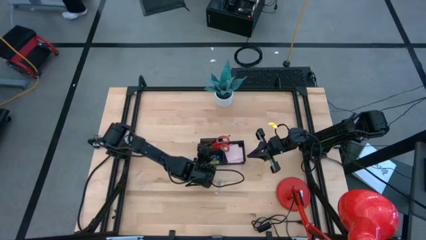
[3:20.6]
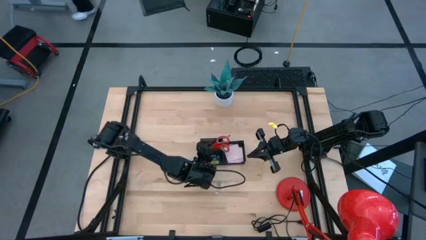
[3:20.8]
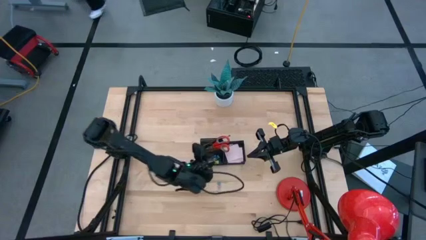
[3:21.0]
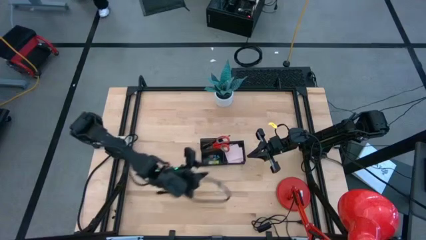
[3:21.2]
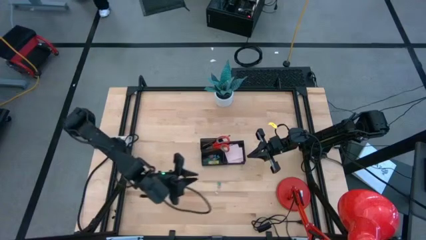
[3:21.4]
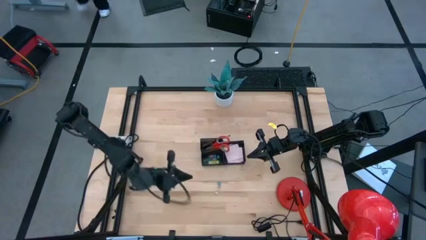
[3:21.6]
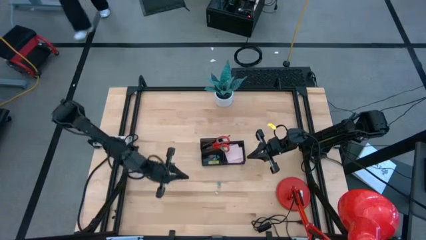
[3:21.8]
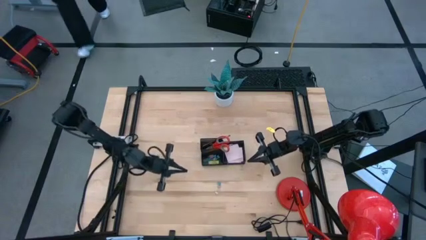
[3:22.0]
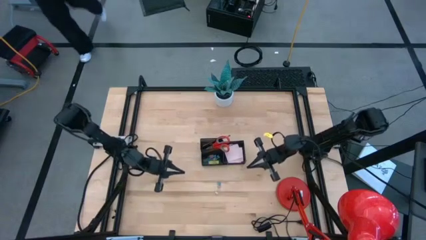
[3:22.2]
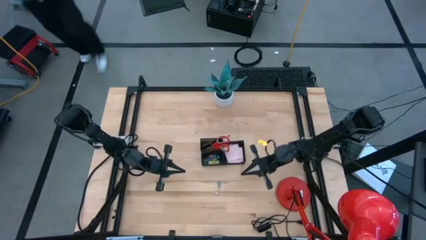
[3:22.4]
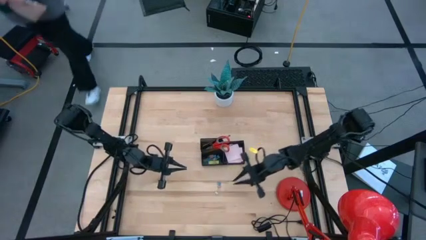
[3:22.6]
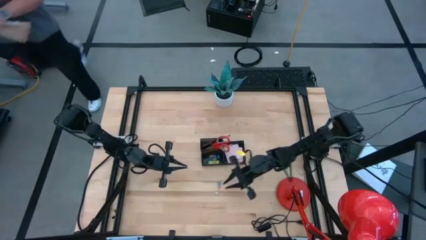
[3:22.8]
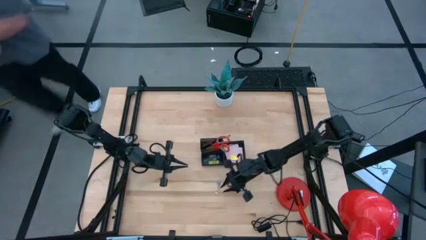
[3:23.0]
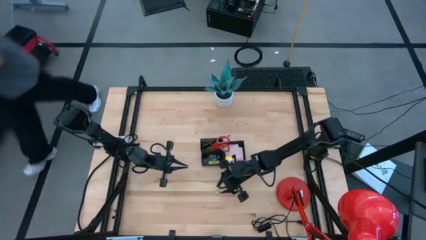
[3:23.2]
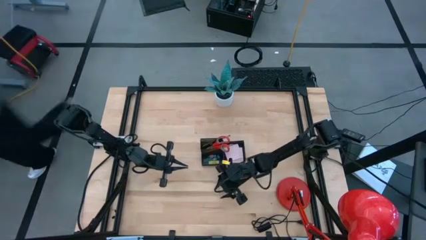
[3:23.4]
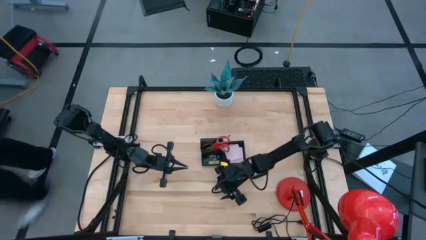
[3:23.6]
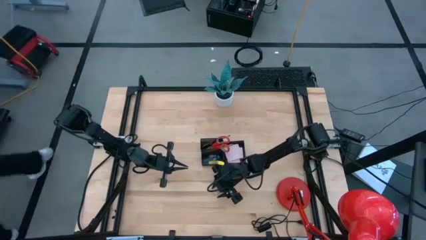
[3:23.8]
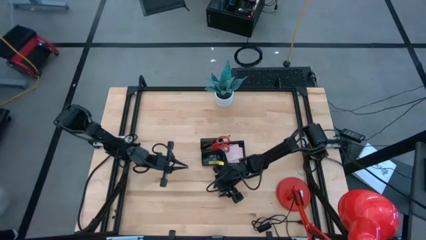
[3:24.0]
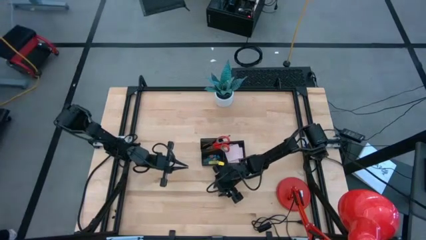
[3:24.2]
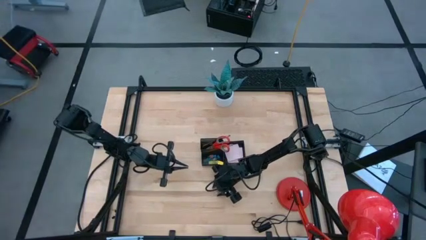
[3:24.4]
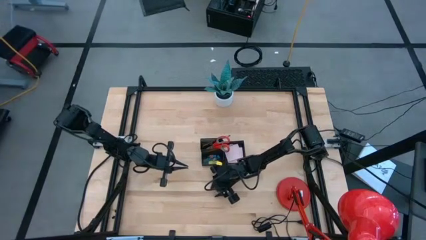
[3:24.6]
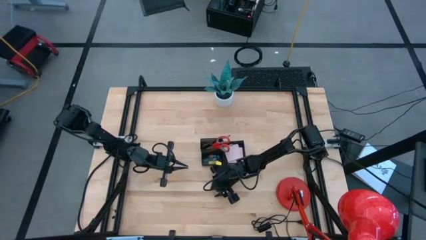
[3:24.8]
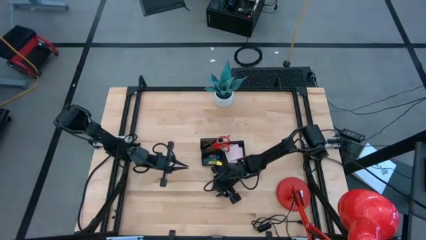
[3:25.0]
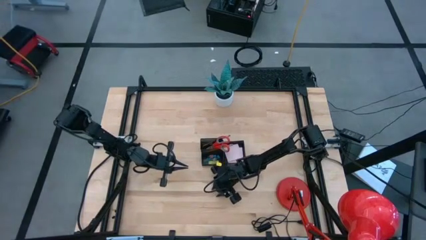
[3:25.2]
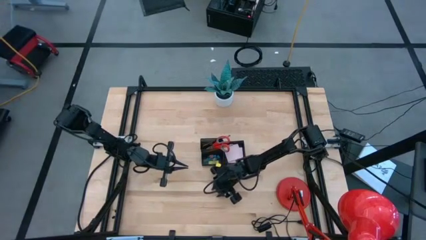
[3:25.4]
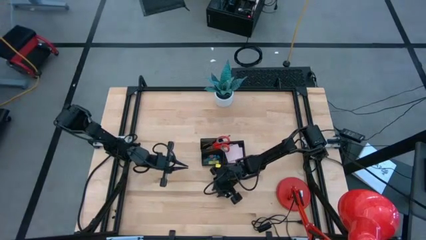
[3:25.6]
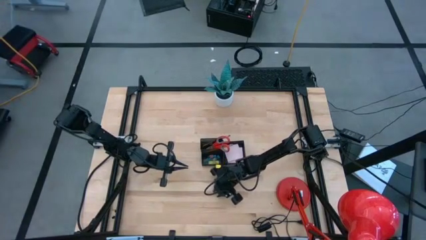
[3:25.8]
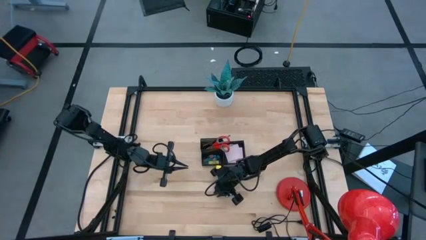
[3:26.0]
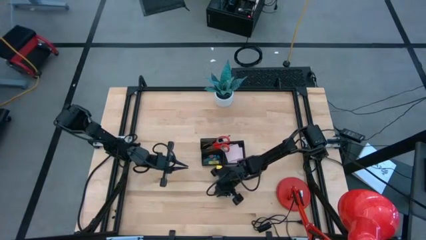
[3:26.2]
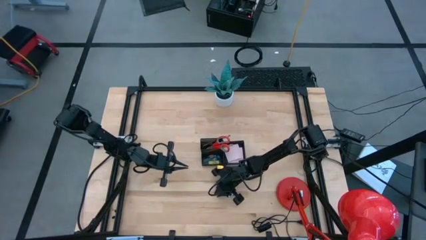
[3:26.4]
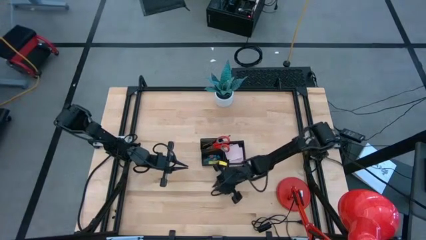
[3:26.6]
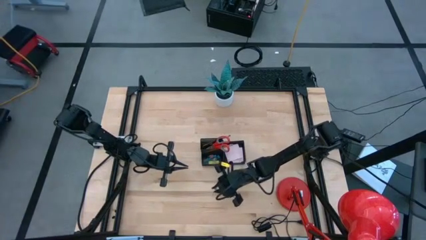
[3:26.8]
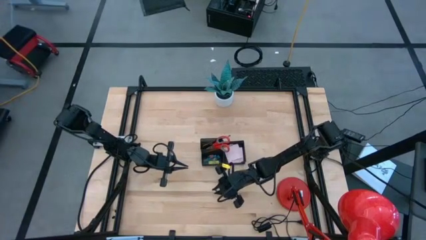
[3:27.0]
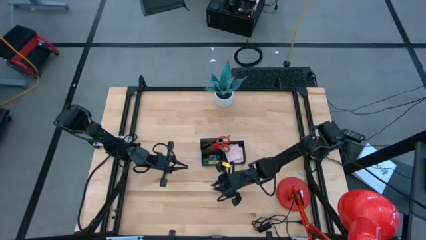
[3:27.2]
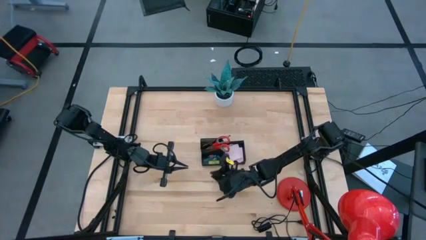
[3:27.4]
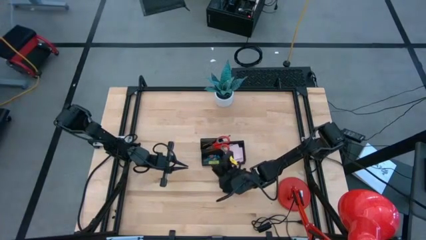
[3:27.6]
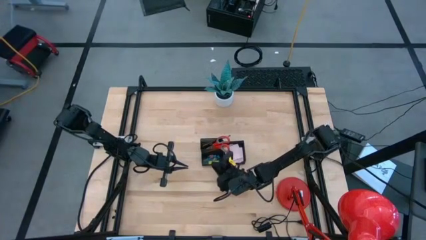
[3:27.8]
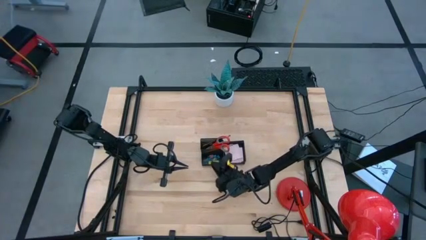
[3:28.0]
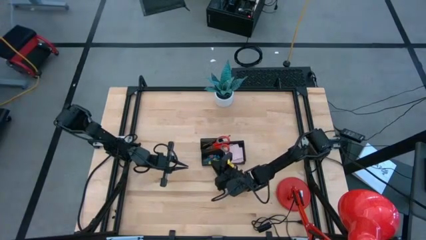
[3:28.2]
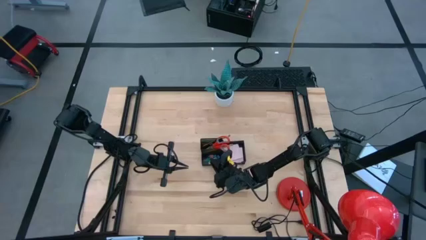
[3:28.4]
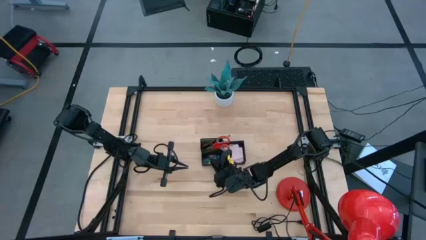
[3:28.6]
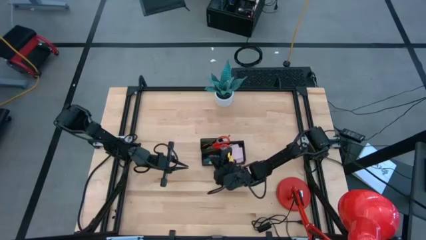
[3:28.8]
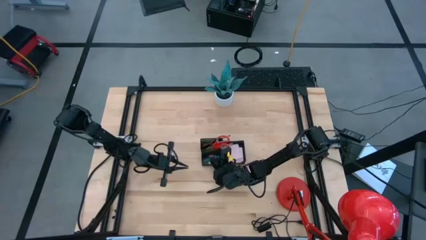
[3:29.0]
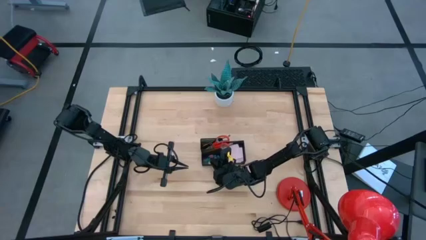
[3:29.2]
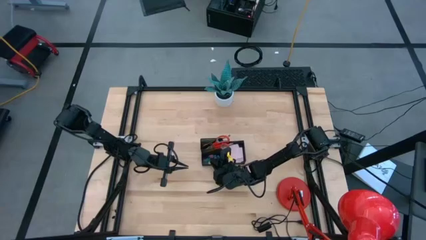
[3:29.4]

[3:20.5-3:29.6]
Task: Pick and place office supplies into organizer
Put the yellow binder clip into the desk organizer

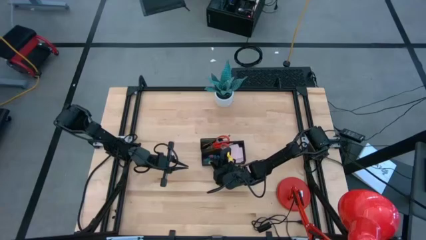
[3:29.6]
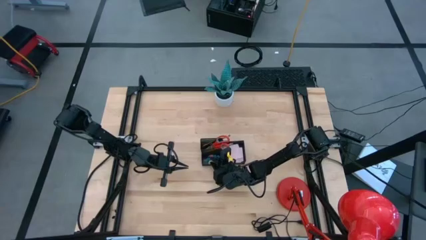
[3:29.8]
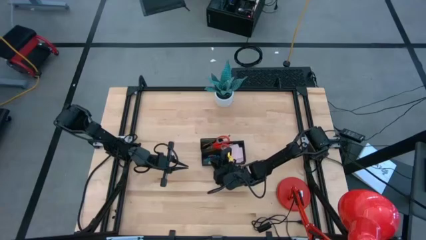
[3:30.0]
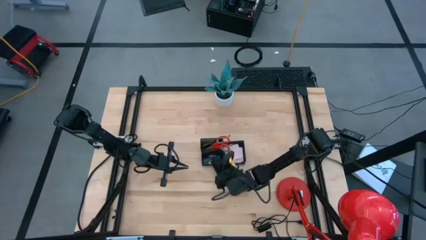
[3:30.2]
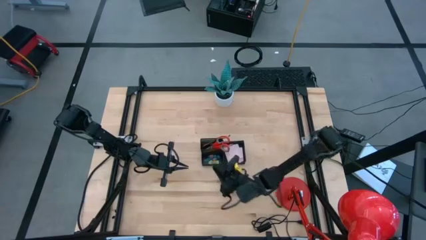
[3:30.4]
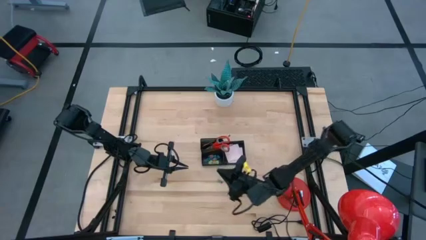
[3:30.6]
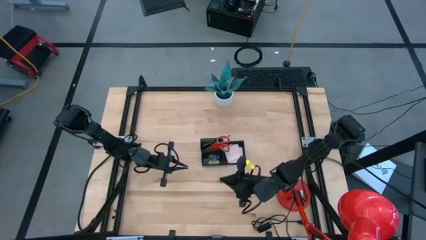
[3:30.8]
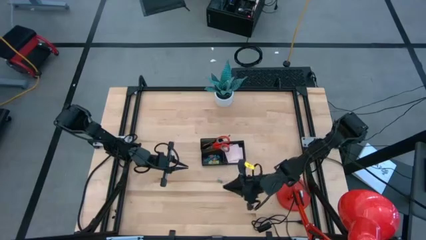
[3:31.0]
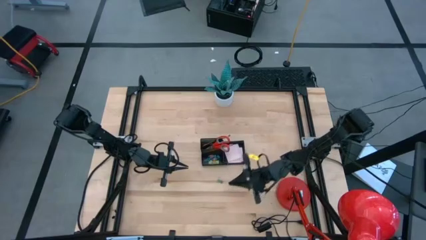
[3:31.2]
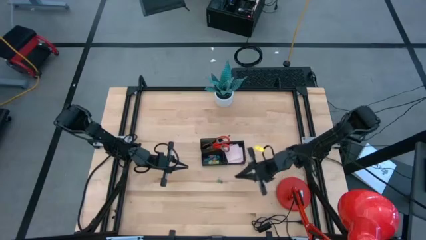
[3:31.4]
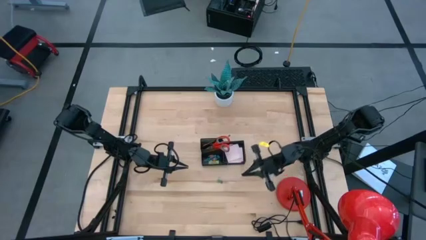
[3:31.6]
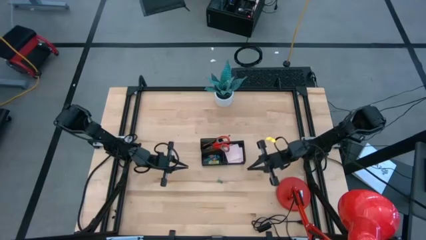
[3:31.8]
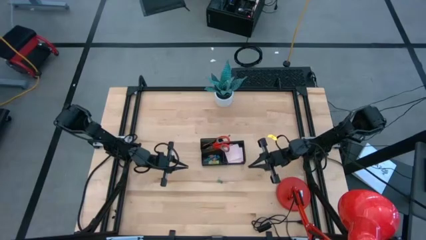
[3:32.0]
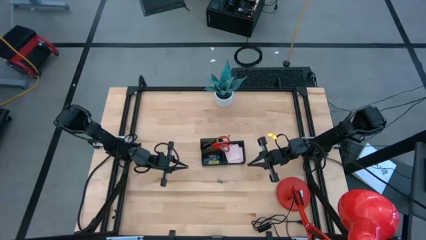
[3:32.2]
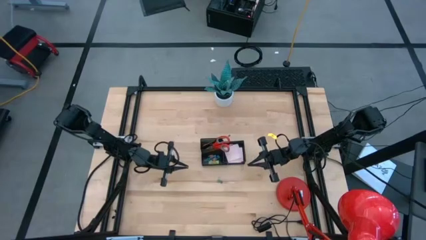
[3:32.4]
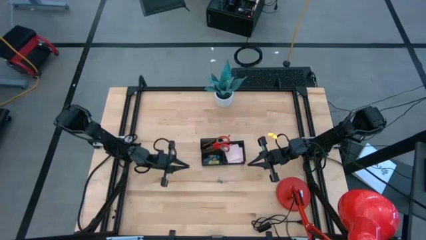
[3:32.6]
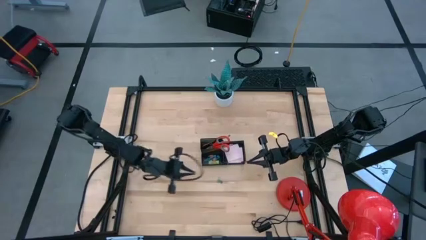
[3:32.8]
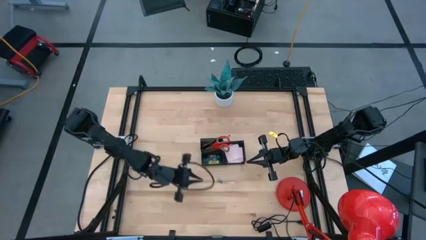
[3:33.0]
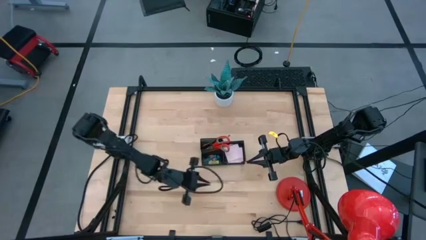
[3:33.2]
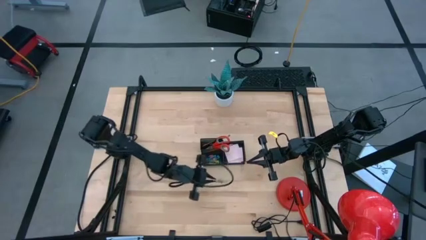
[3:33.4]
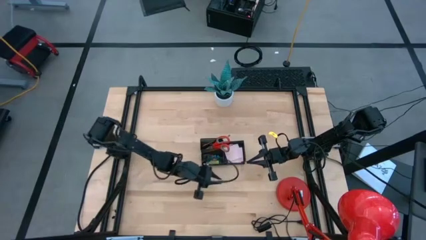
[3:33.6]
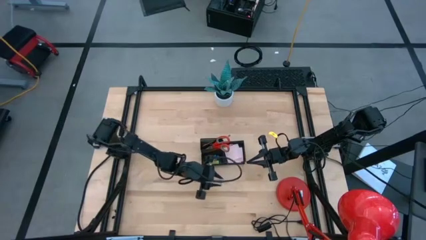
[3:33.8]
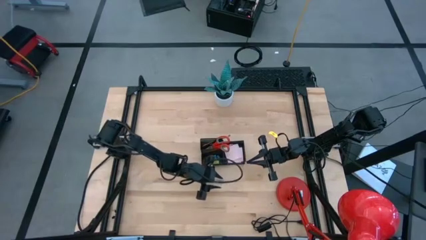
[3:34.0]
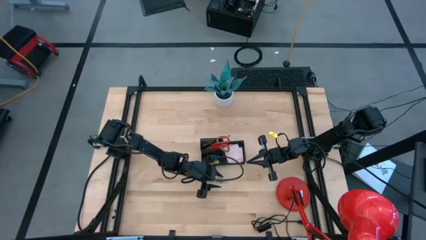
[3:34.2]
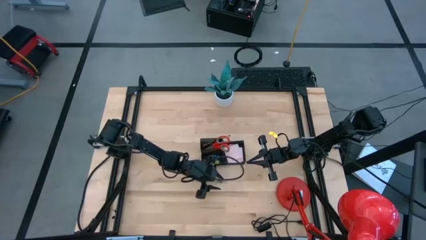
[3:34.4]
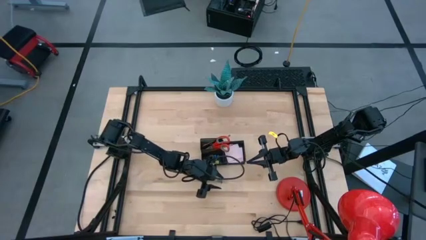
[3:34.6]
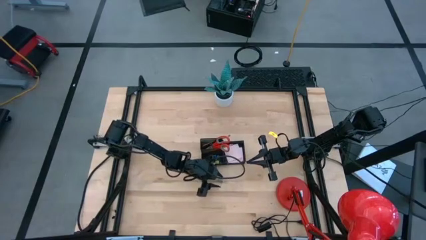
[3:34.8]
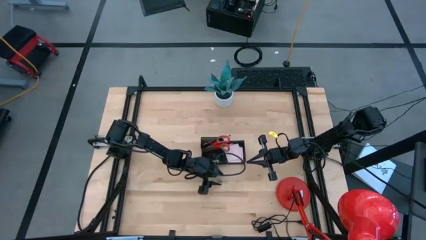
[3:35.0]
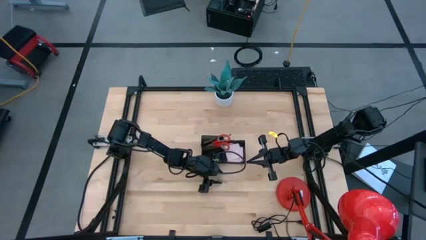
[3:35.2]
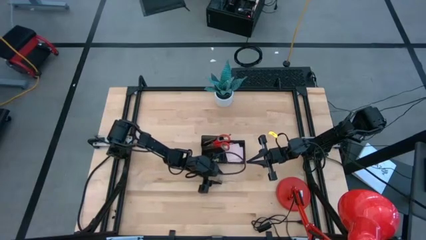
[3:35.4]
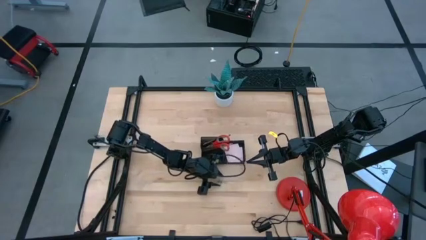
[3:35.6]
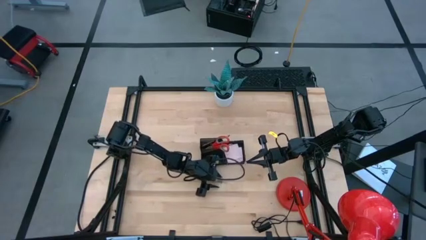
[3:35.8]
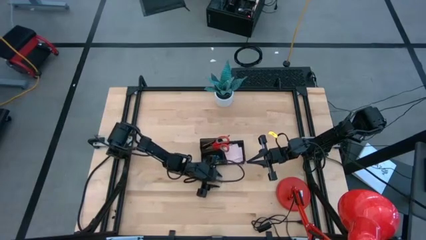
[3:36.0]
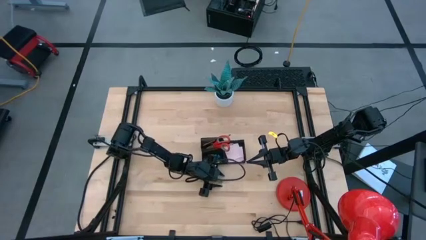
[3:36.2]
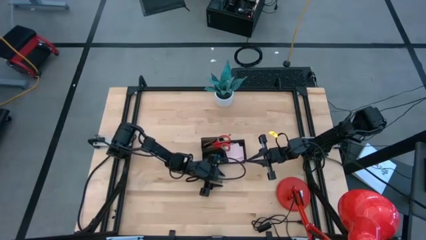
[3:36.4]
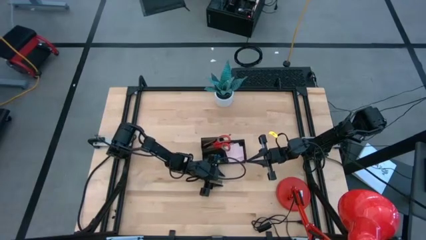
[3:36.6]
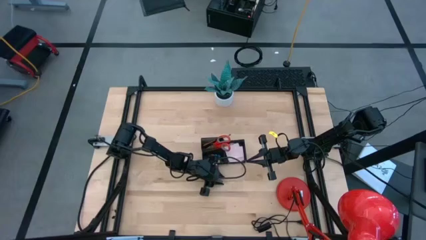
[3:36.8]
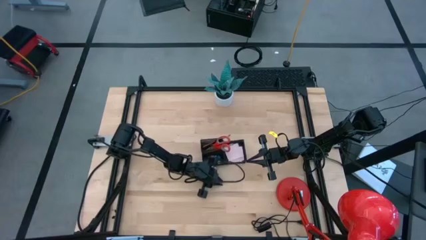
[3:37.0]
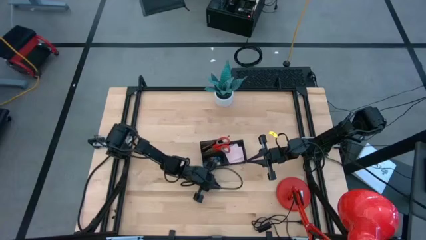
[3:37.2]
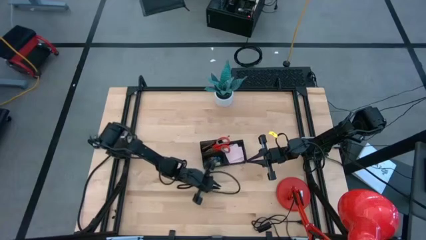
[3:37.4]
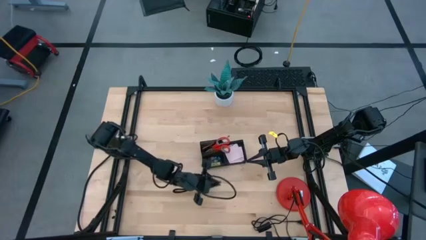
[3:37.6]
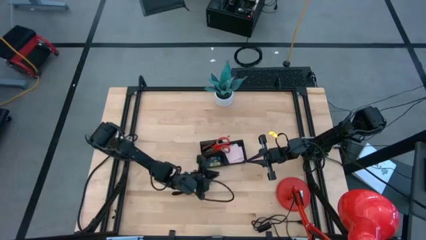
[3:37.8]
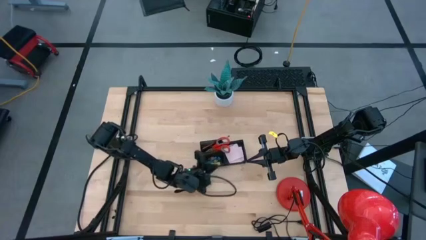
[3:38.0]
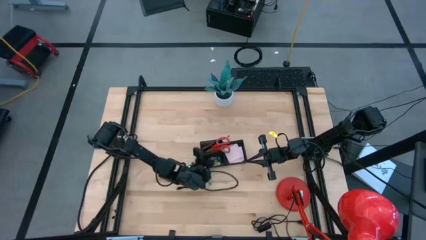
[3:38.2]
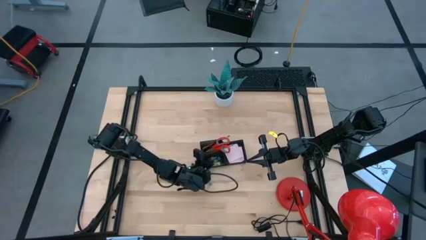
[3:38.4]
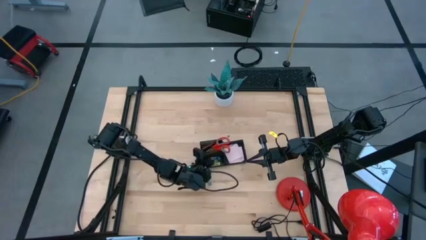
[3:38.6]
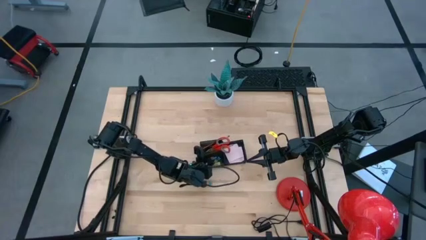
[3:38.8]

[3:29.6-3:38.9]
Put the pink binder clip into the desk organizer
